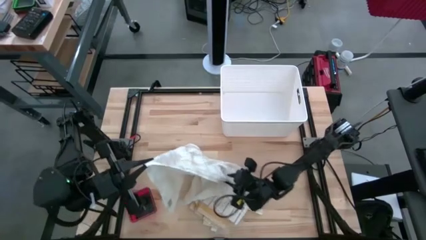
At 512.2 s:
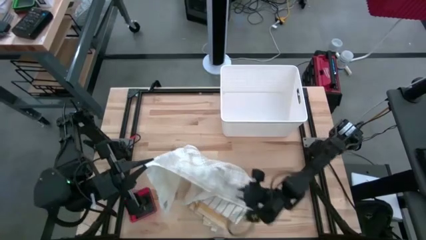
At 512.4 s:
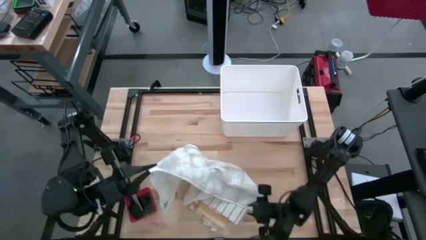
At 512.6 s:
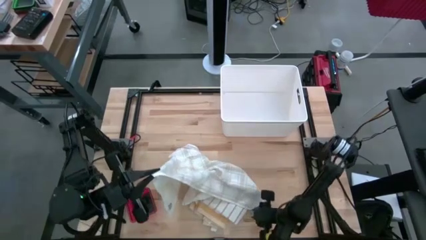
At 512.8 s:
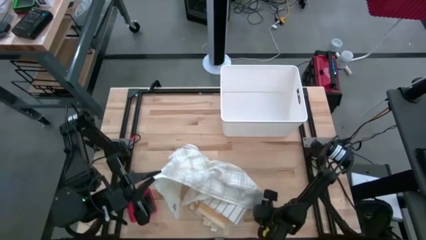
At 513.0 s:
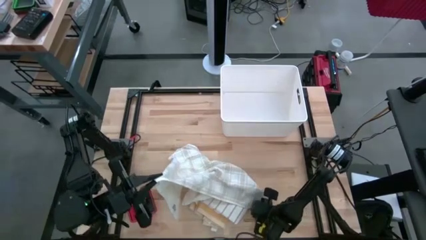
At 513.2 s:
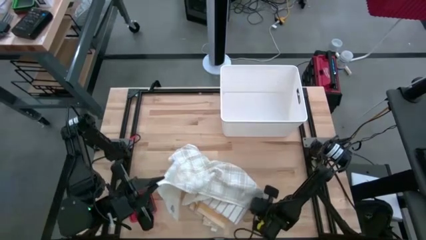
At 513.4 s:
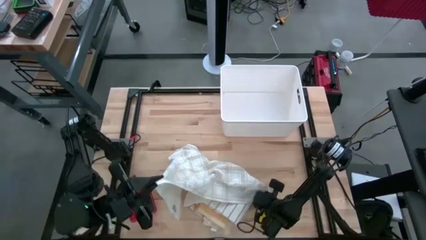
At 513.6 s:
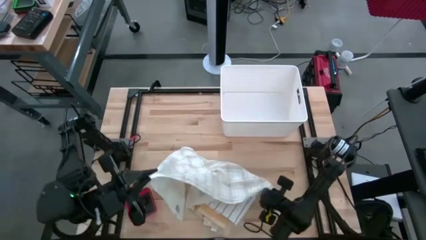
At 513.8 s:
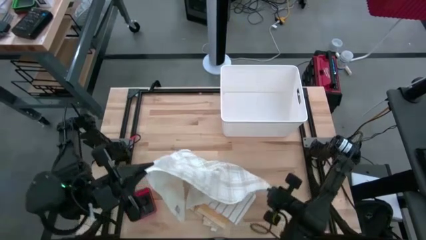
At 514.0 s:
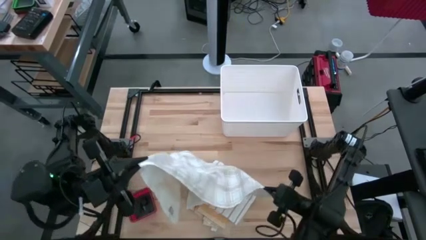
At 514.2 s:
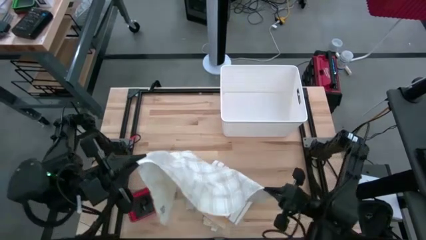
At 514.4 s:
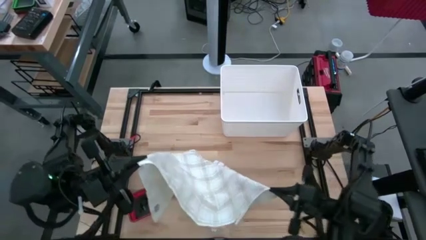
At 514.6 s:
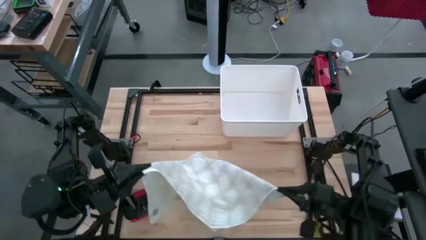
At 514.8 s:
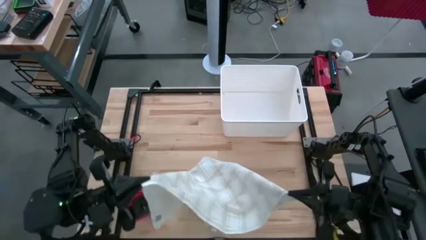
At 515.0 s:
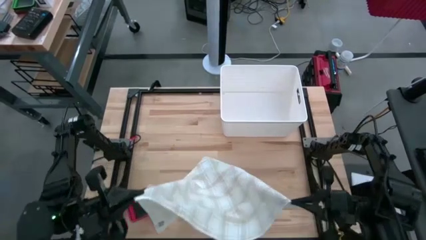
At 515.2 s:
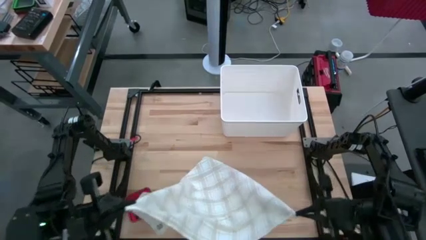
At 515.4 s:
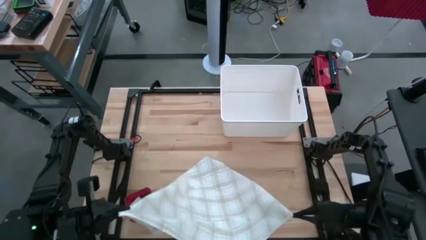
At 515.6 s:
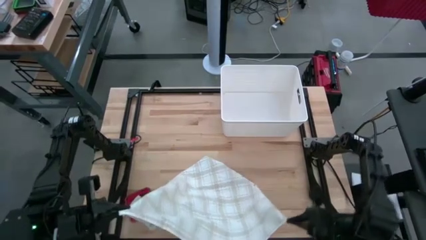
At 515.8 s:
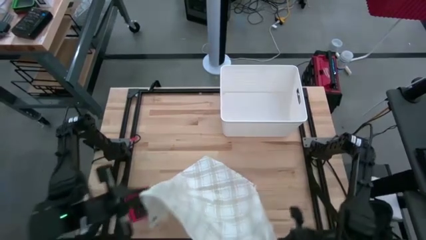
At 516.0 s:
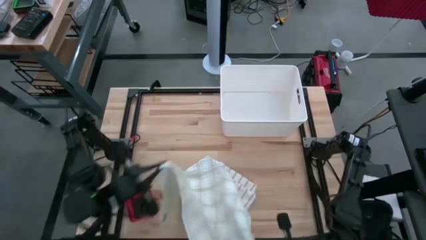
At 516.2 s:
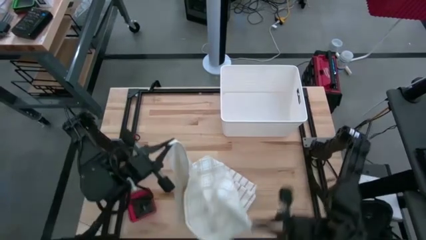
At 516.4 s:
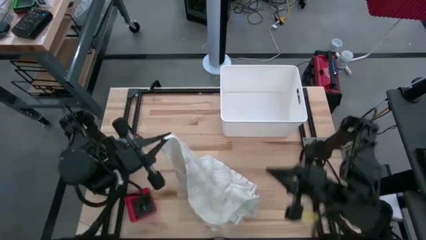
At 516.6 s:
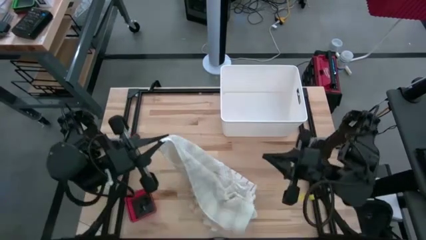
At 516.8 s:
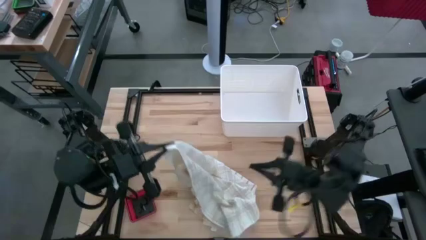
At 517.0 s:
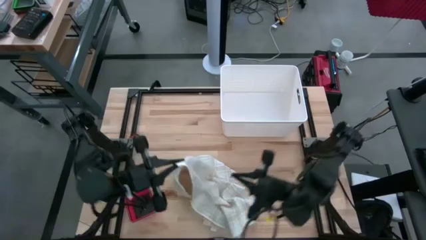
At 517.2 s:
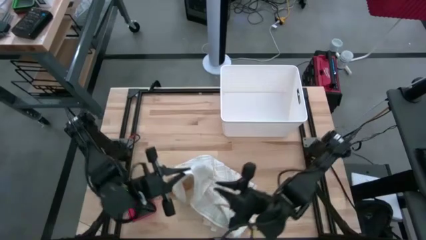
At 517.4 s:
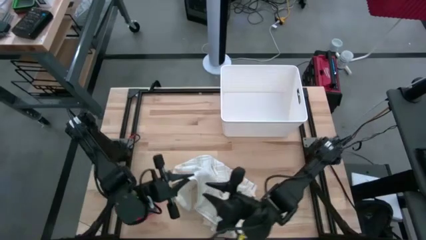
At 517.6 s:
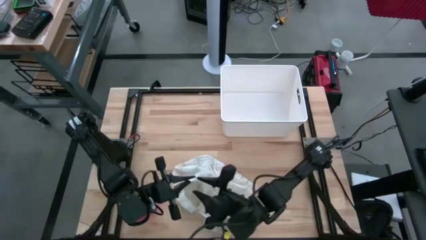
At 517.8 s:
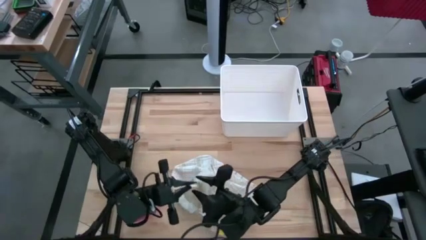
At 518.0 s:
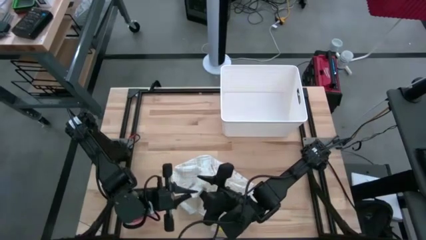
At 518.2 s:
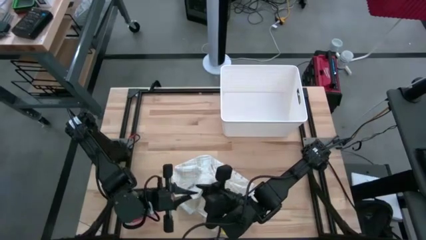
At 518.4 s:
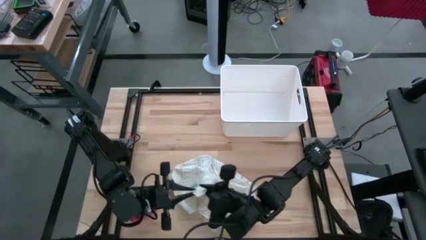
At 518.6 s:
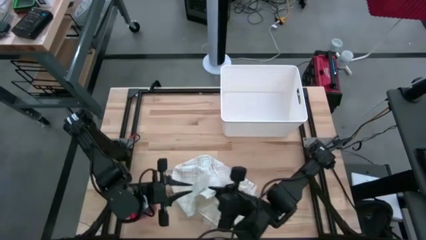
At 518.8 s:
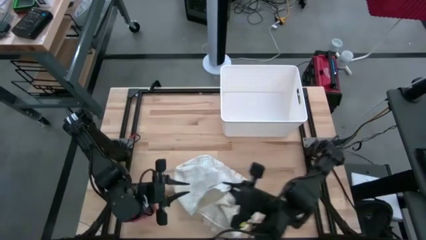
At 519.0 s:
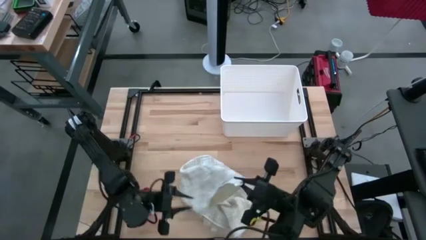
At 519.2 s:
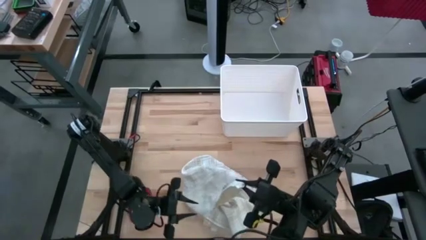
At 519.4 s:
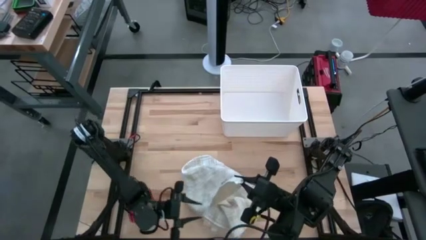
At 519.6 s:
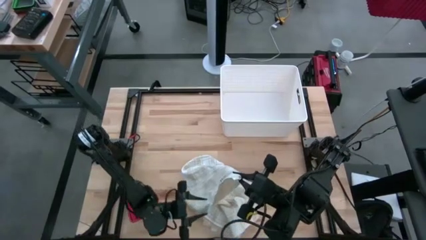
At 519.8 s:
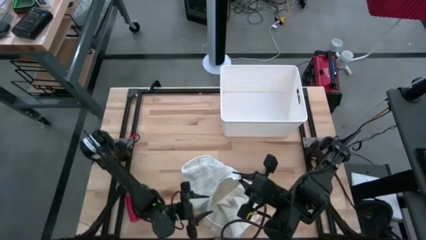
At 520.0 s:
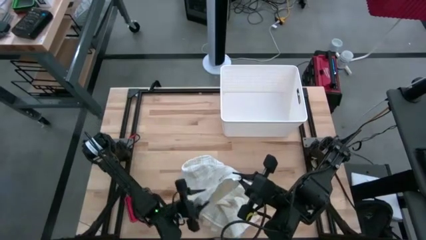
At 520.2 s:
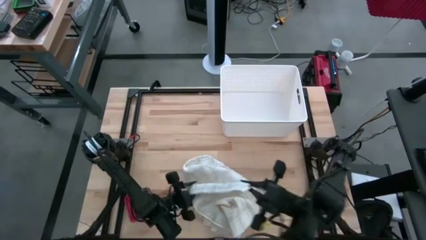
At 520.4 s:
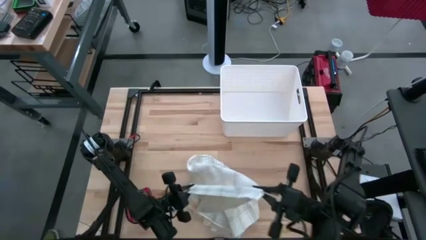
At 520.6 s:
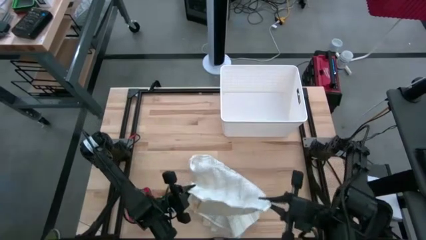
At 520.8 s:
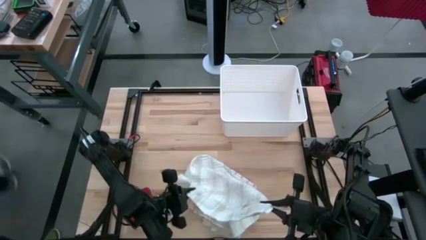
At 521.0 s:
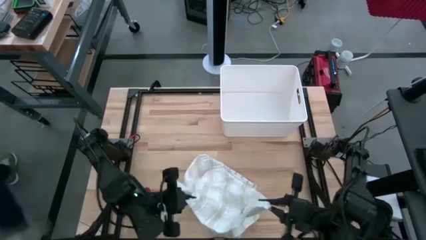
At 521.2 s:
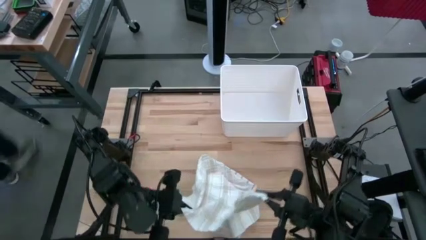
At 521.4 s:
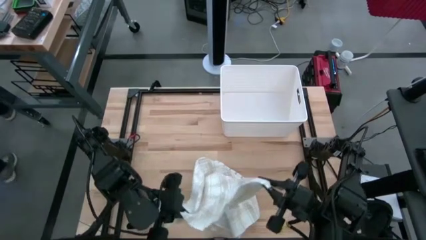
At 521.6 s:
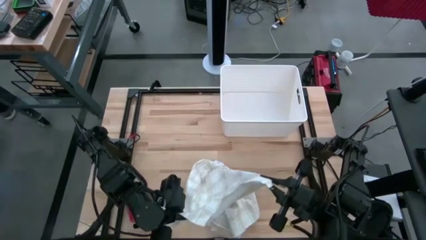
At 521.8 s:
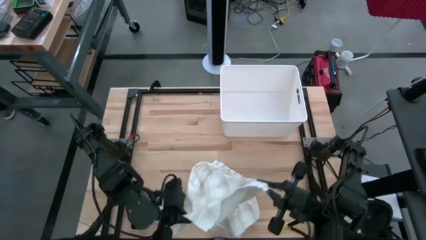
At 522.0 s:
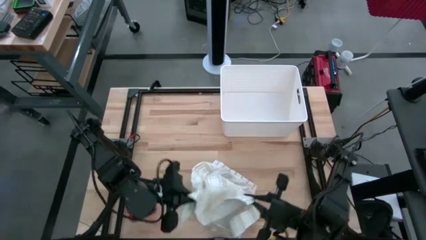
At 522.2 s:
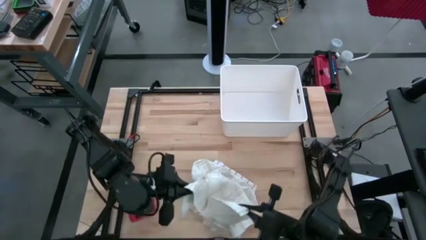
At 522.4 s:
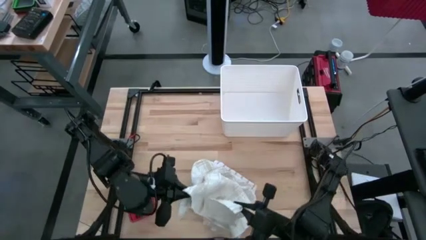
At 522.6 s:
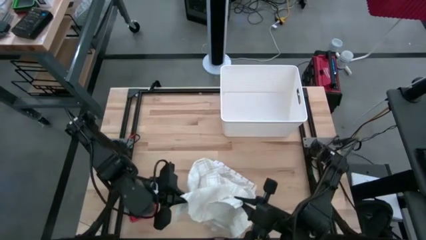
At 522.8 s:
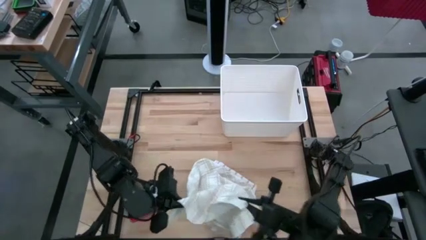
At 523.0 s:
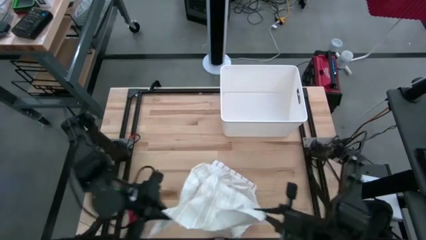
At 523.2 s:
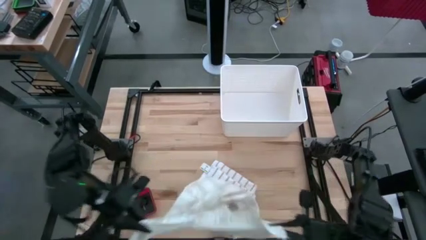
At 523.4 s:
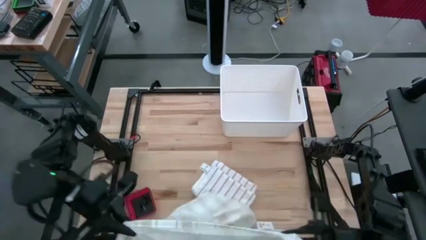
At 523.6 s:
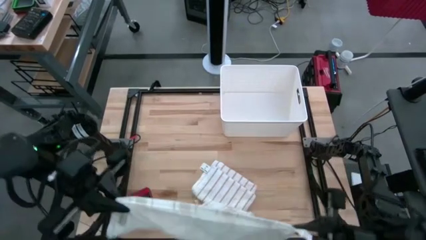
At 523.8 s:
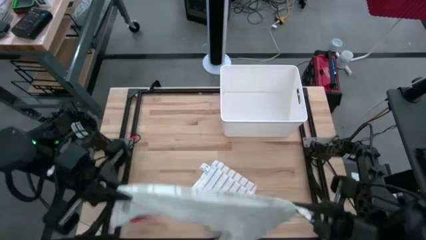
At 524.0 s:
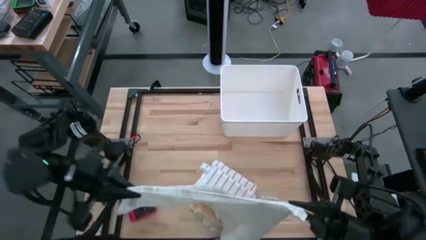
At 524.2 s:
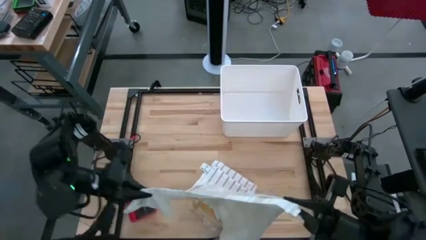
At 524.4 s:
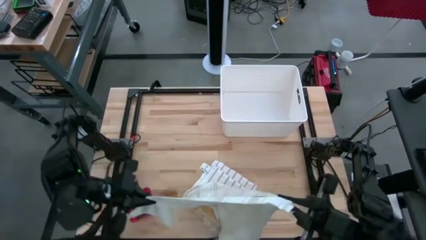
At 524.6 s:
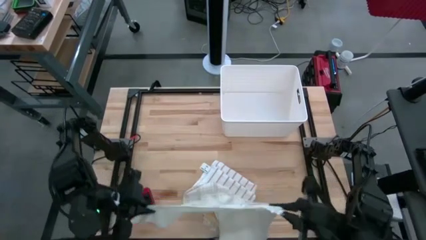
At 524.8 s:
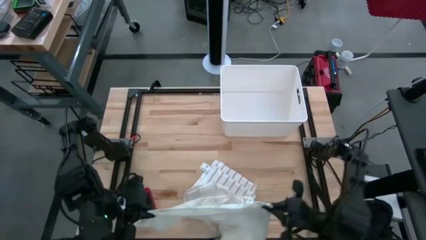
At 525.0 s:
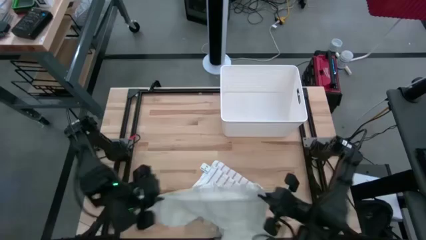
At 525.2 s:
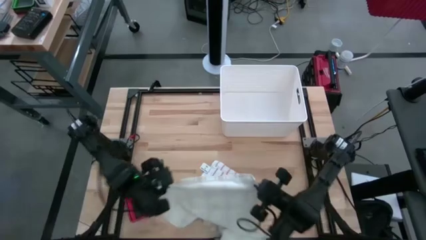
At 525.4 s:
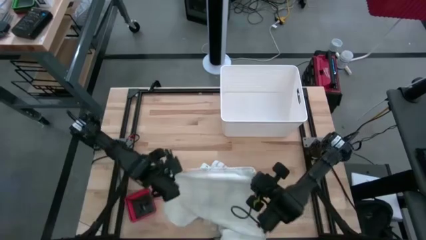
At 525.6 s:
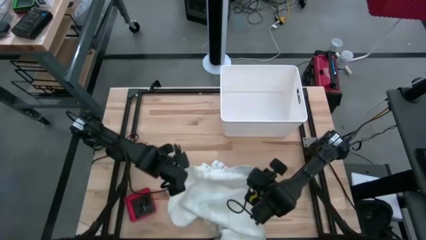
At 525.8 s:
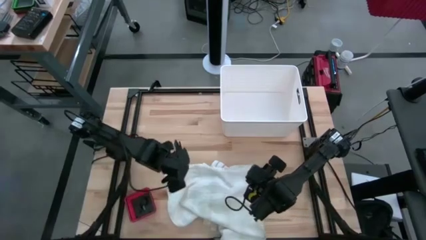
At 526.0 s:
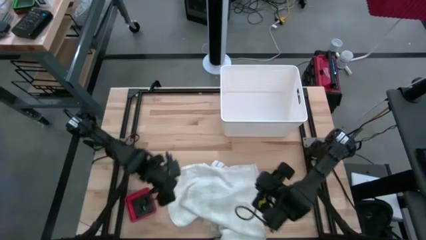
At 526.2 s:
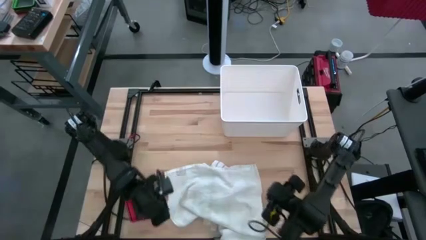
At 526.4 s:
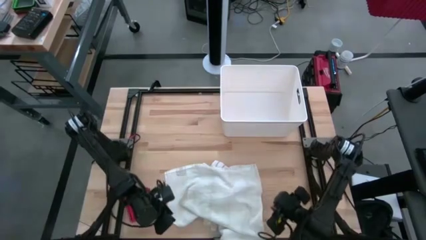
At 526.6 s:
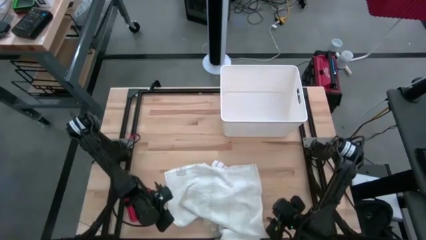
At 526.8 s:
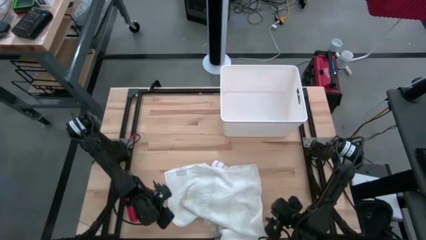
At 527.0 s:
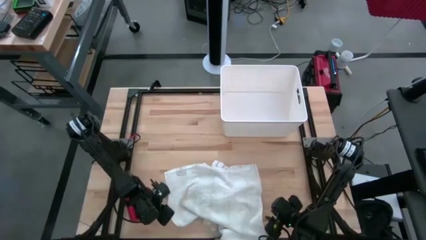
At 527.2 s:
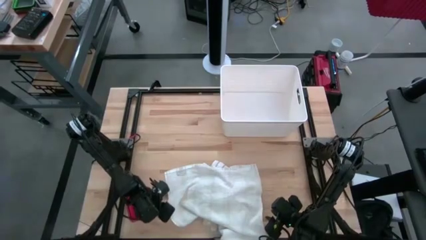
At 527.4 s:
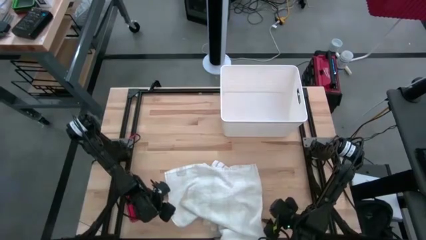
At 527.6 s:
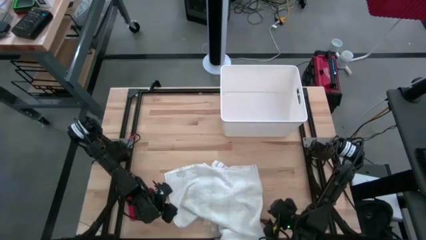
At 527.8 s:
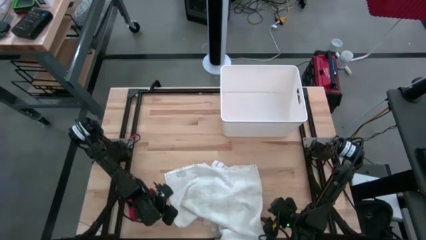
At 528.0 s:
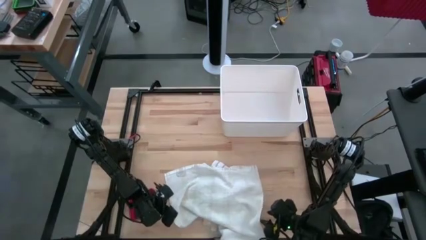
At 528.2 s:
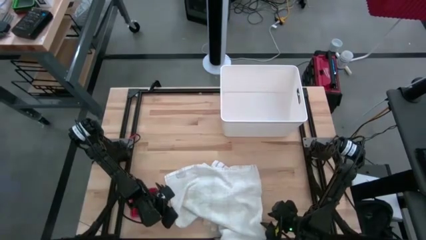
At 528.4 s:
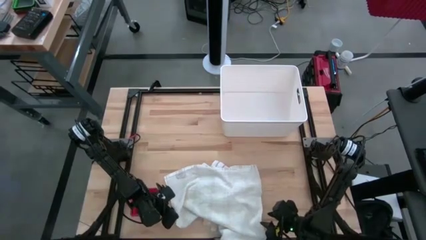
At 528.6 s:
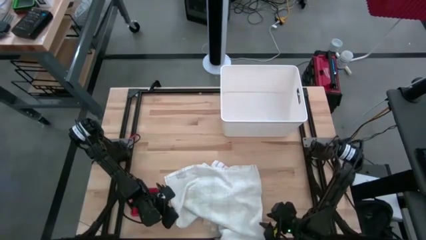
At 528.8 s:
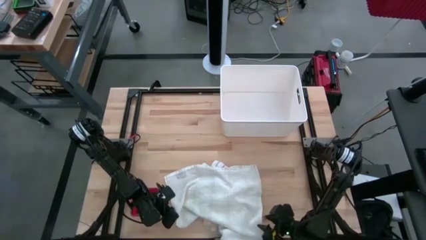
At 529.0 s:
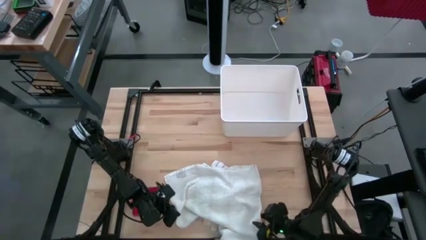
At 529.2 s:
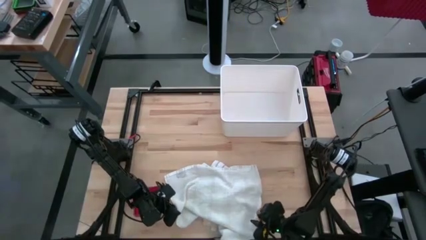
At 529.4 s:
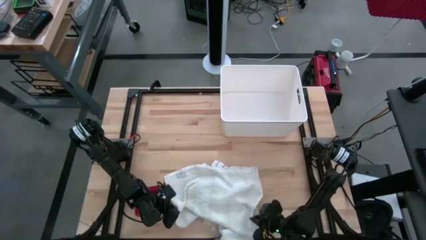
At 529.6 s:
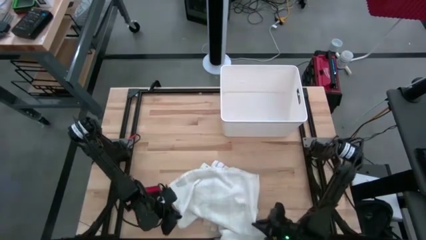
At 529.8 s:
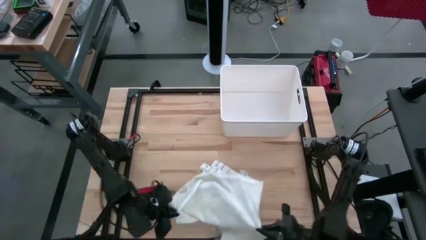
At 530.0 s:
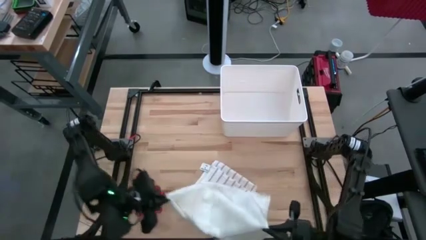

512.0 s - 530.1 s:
Task: Fold towel
Fold the light brown kitchen towel
